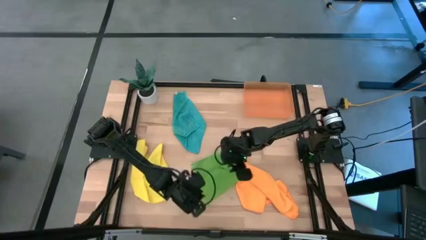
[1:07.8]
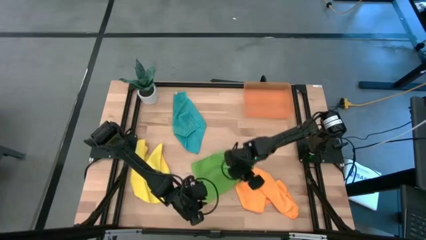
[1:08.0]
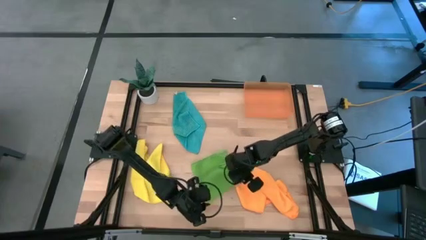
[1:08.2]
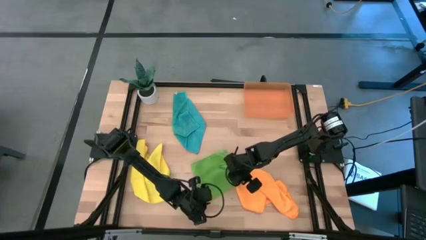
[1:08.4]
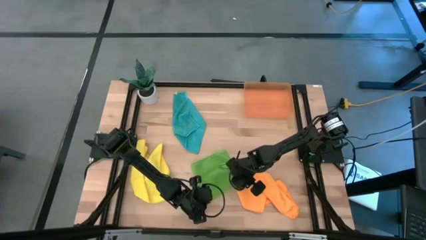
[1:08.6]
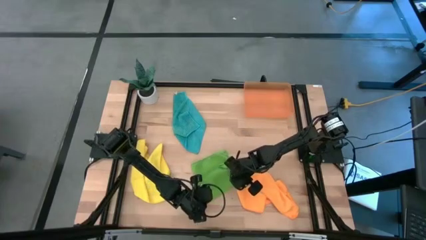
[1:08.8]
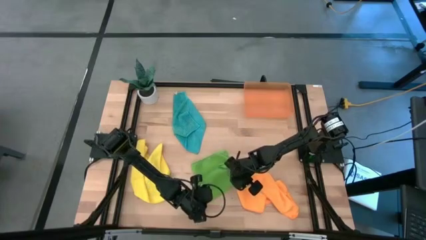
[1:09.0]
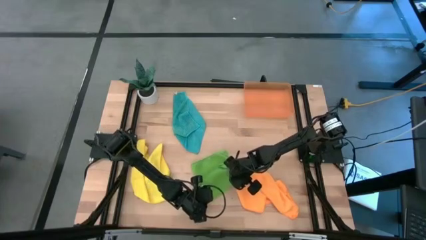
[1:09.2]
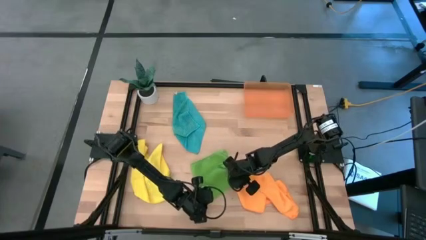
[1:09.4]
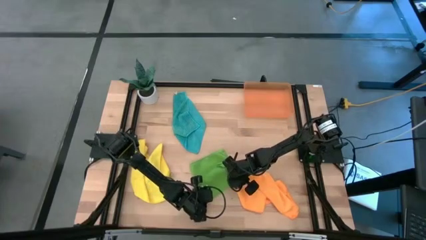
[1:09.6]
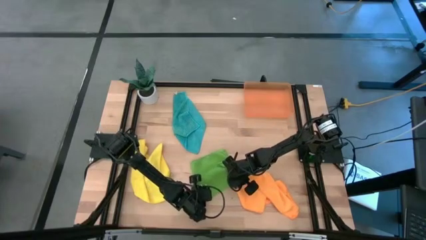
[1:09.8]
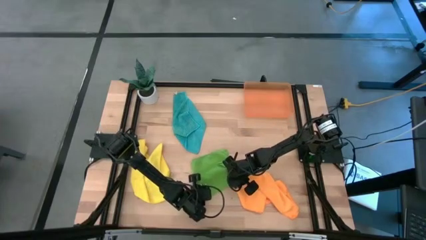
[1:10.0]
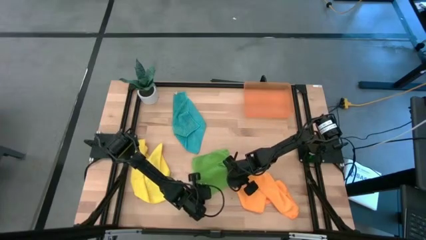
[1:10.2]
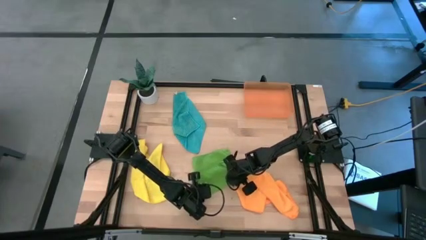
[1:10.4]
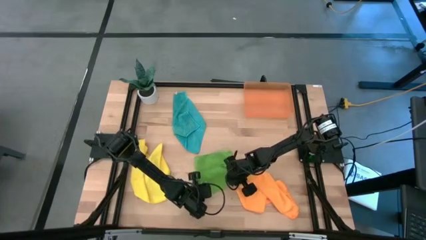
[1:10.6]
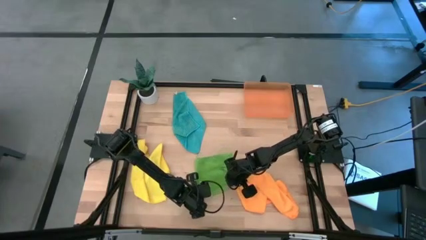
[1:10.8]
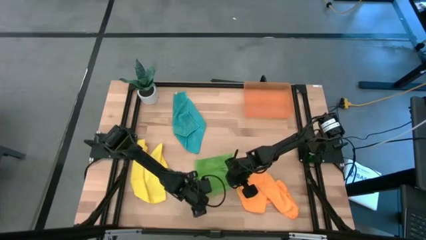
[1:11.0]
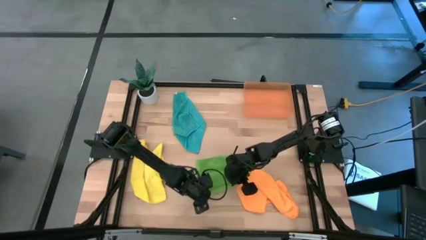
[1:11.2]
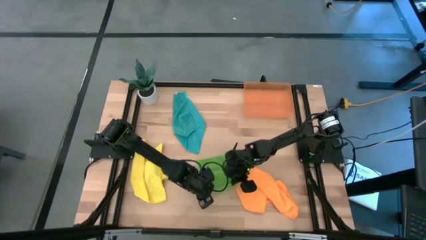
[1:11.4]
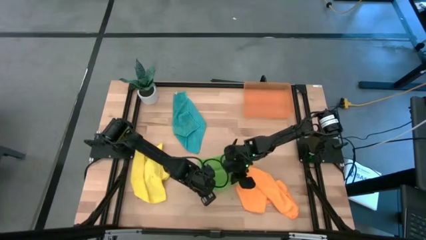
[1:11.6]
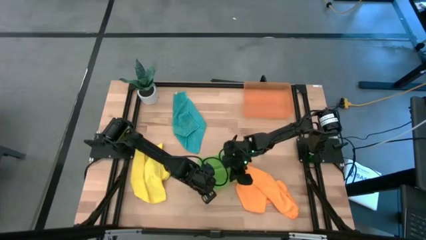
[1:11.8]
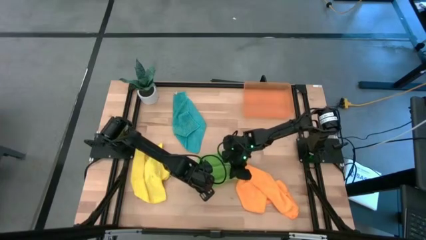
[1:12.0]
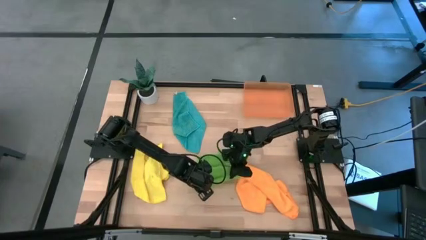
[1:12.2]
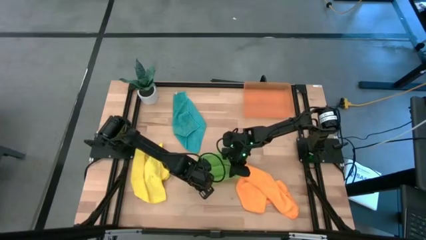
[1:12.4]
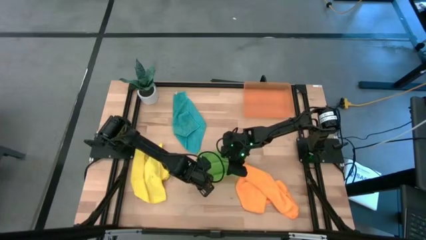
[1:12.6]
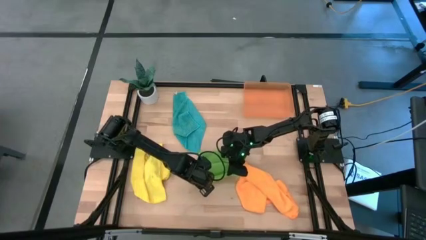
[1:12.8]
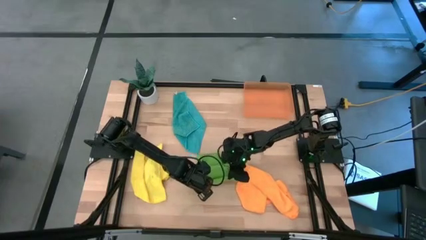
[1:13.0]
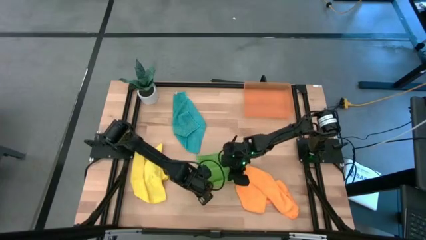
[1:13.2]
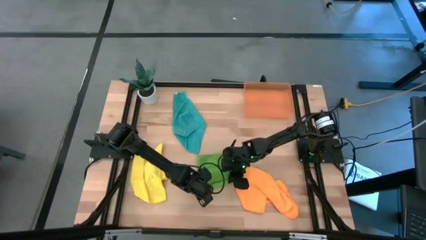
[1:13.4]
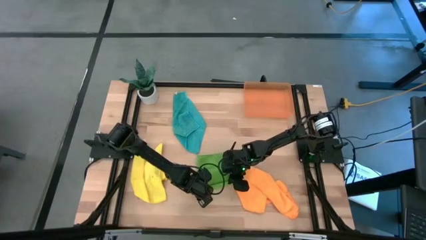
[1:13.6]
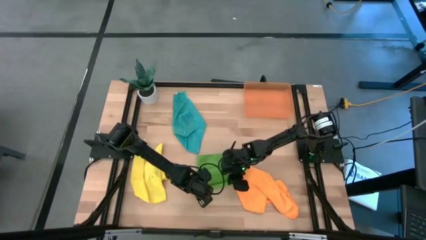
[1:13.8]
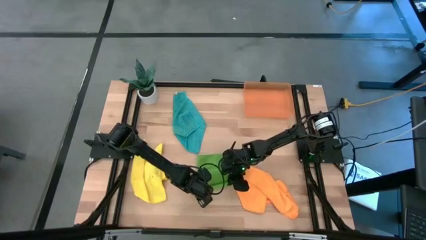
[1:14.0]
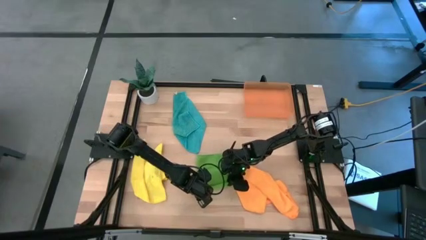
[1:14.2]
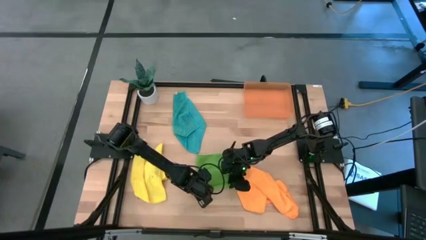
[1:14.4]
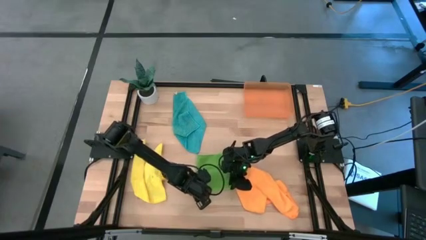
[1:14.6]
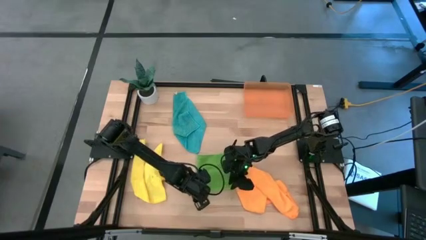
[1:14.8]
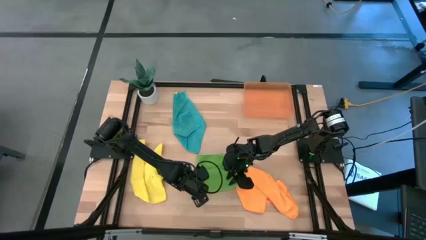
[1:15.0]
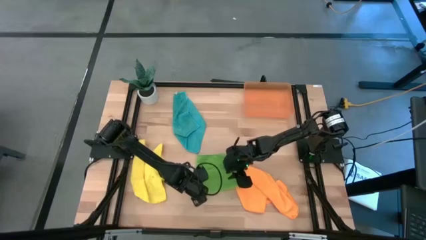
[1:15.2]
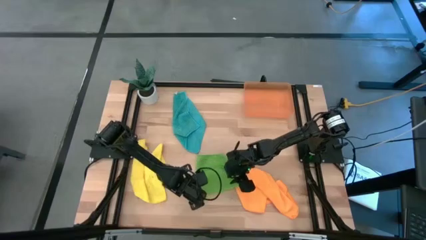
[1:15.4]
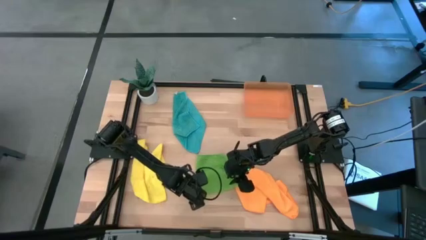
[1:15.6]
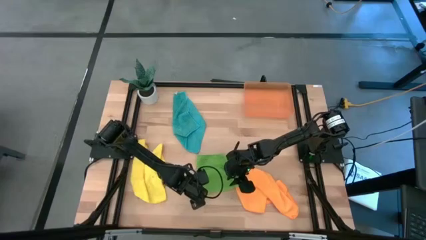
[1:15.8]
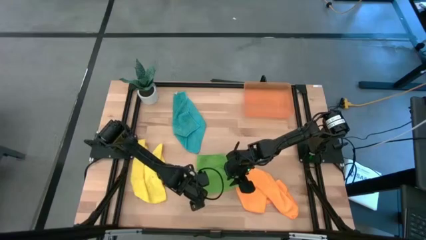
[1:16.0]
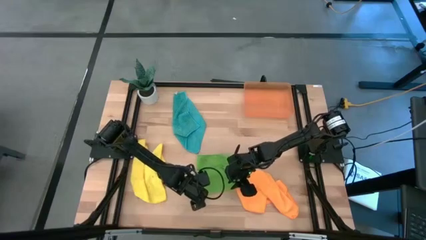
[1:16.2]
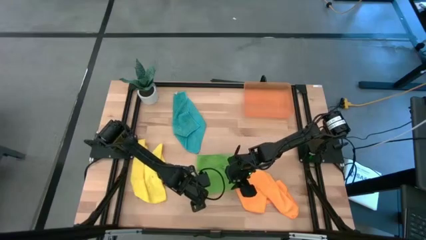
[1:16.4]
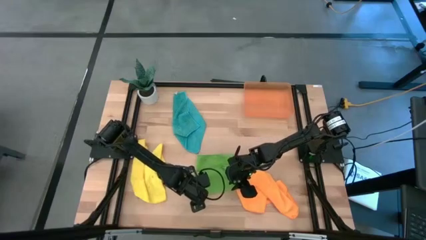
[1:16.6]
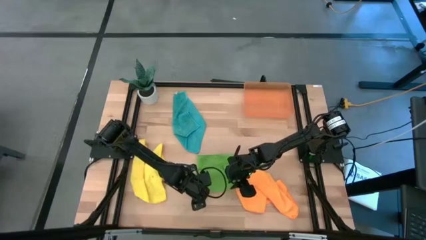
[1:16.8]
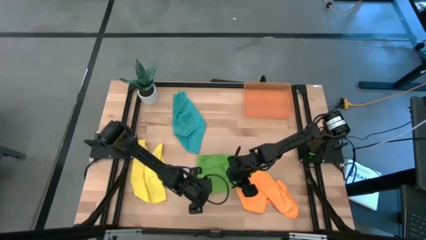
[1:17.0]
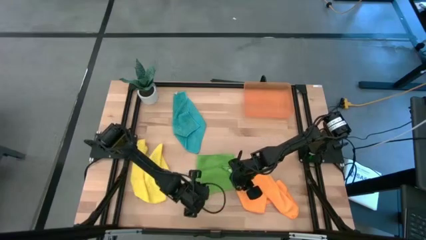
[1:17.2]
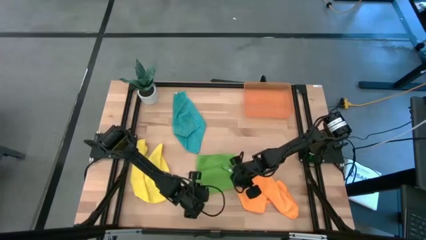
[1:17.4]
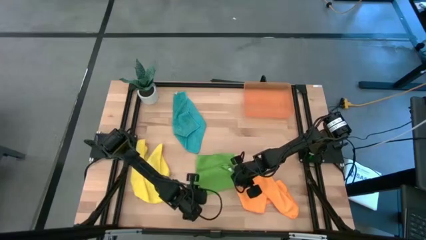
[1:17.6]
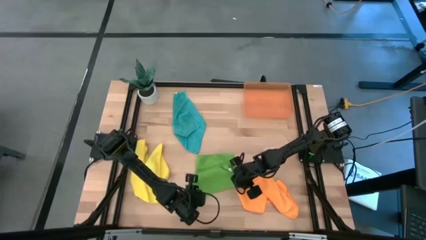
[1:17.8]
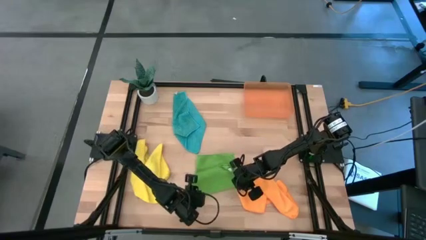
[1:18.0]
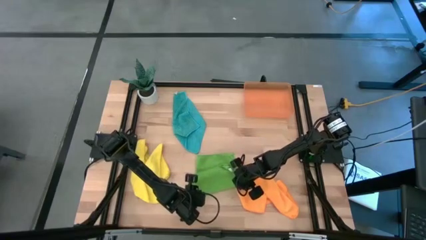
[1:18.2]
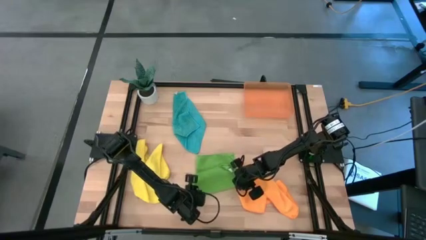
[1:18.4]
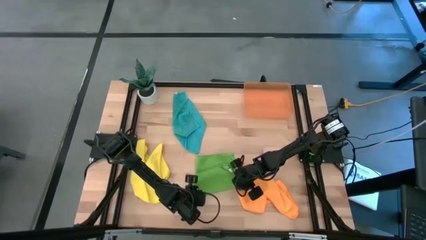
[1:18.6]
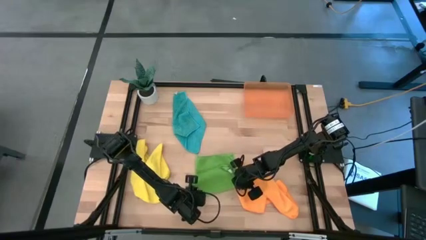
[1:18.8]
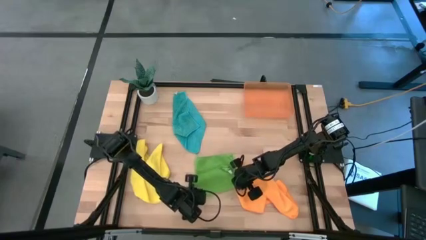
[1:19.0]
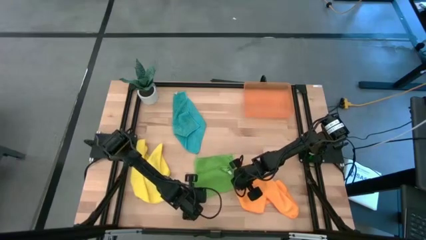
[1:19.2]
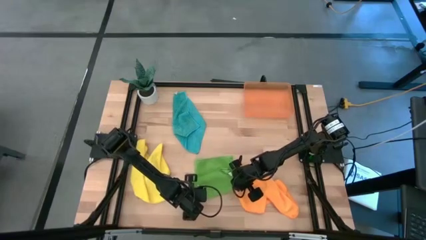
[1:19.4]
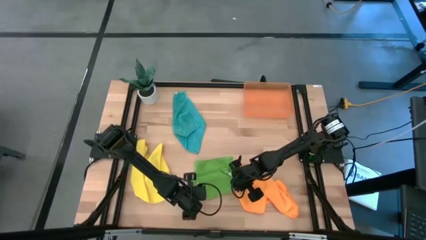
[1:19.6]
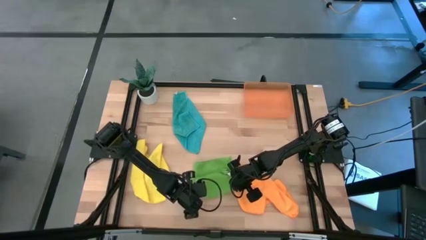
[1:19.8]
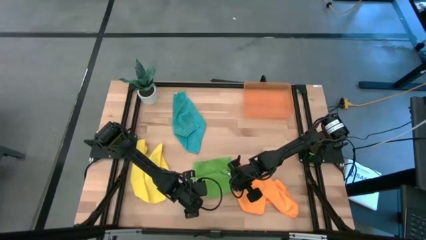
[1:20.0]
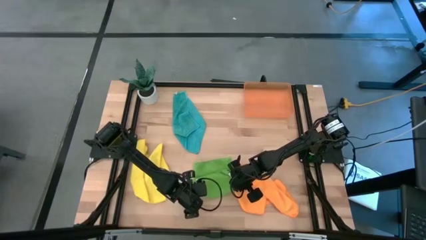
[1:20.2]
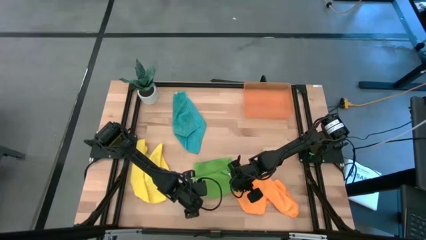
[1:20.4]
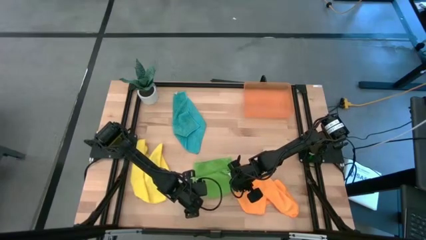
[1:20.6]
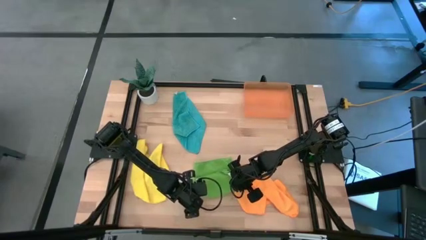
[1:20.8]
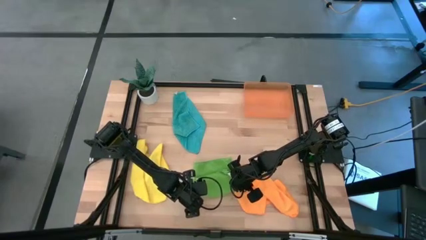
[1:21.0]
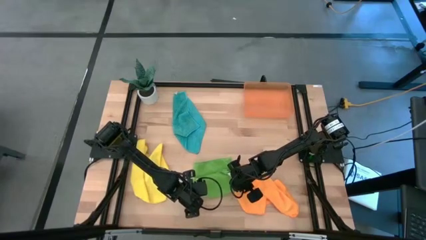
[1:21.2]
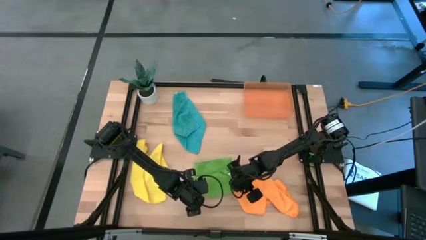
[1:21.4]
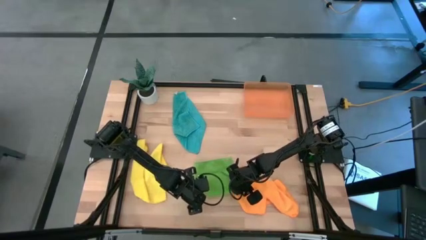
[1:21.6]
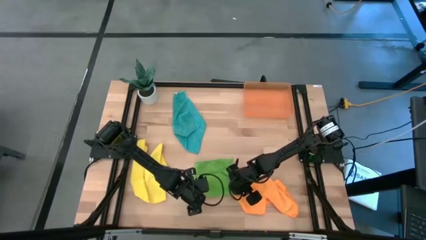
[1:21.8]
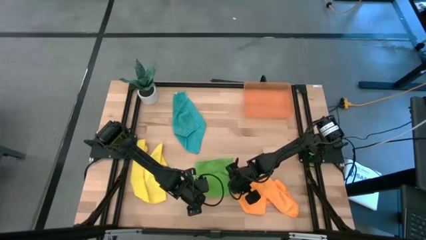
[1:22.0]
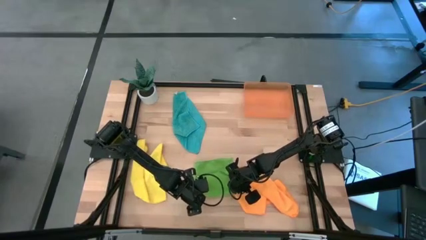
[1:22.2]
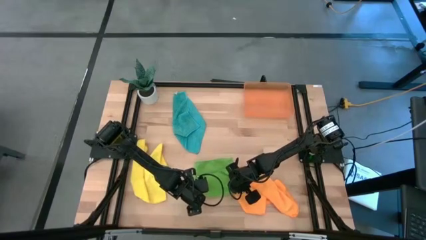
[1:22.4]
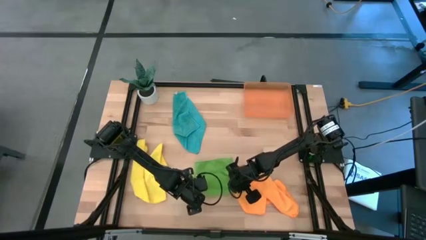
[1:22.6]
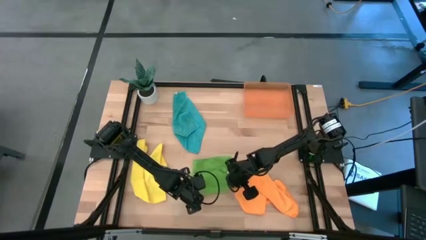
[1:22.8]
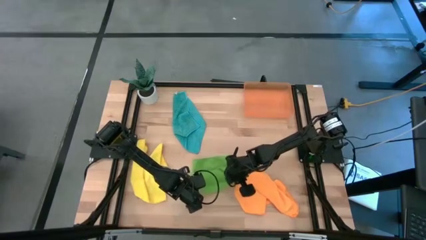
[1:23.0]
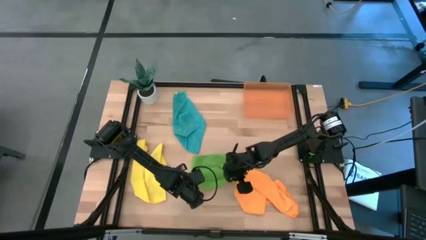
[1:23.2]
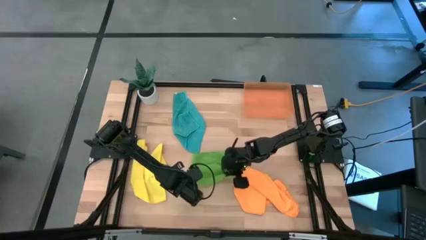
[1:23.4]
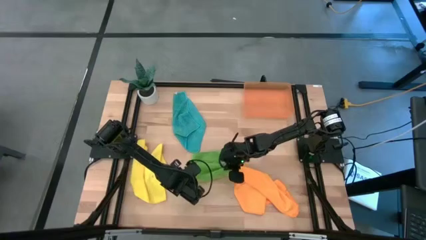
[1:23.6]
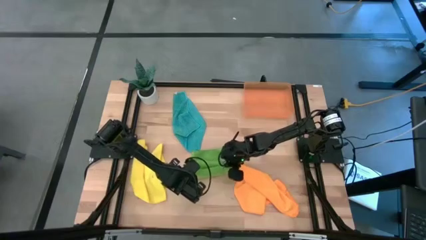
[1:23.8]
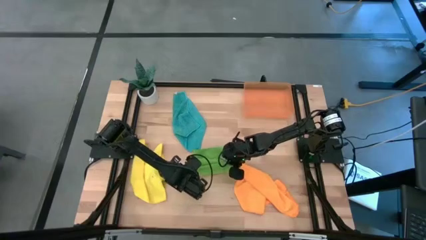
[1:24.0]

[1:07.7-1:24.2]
Task: Roll microfiber towels into tight, uniform cylinder then place into a basket
Fold the green towel
